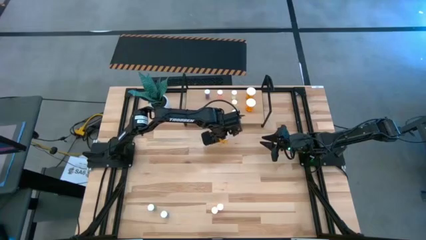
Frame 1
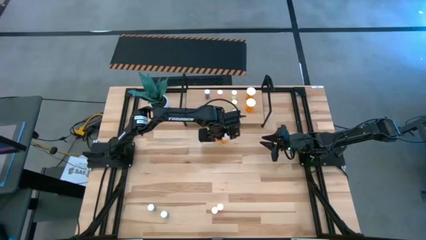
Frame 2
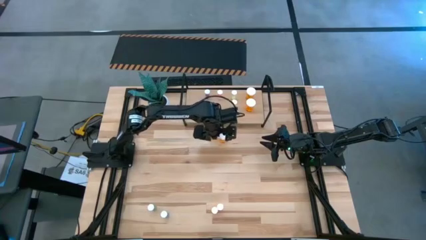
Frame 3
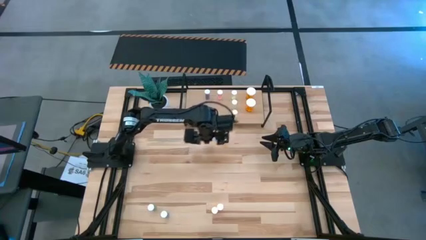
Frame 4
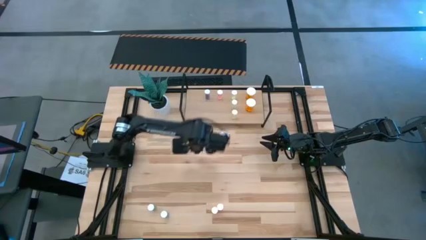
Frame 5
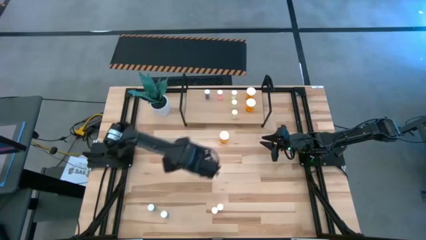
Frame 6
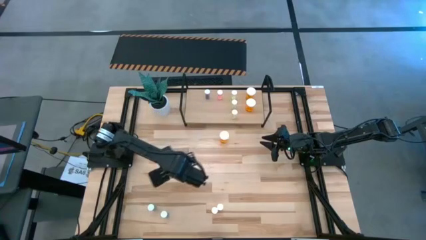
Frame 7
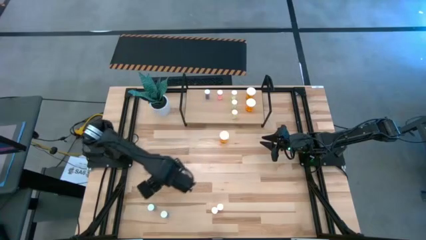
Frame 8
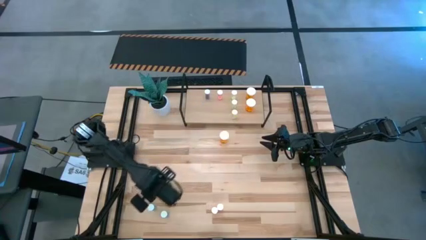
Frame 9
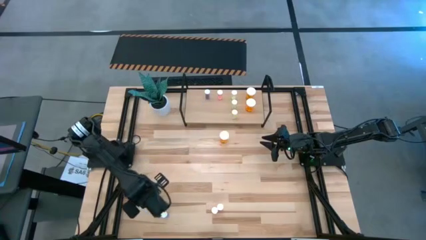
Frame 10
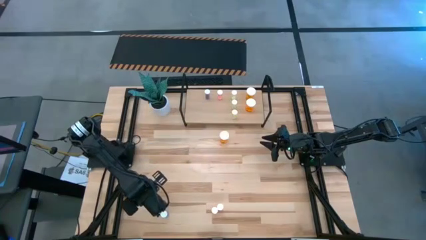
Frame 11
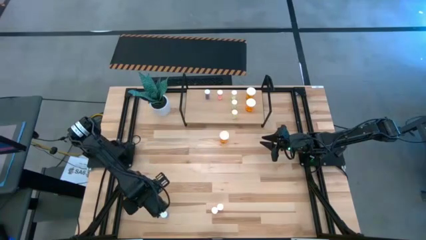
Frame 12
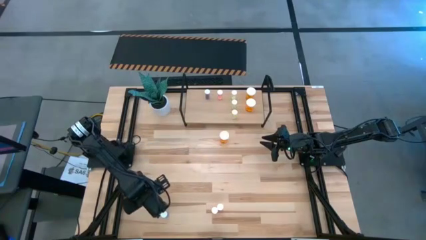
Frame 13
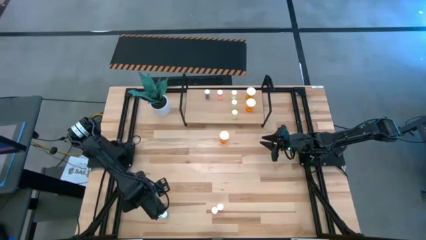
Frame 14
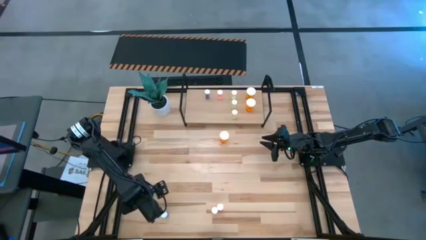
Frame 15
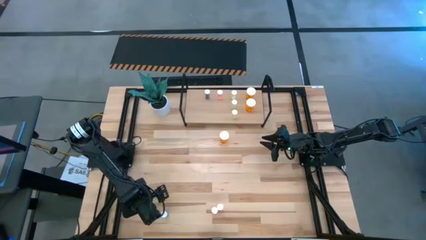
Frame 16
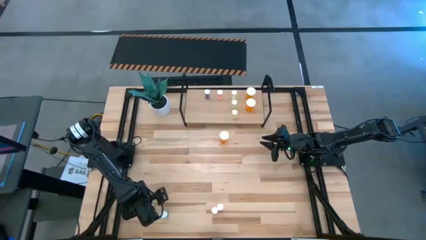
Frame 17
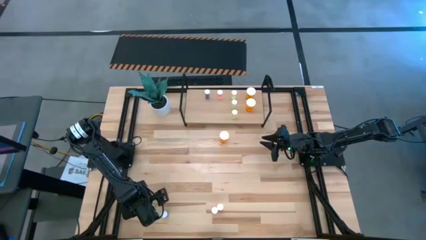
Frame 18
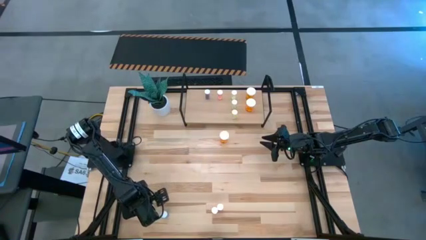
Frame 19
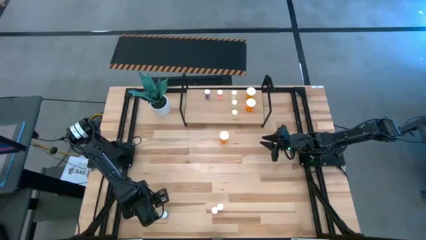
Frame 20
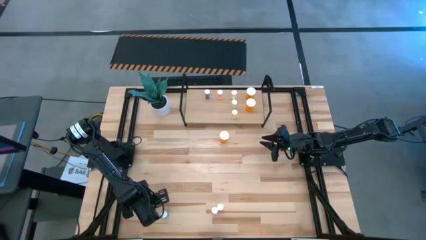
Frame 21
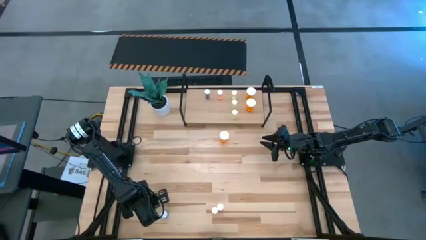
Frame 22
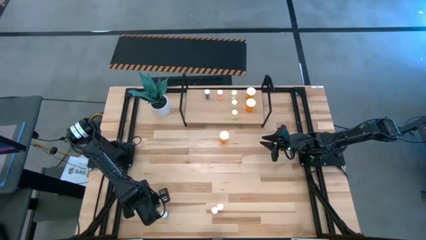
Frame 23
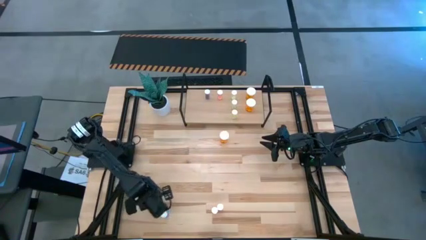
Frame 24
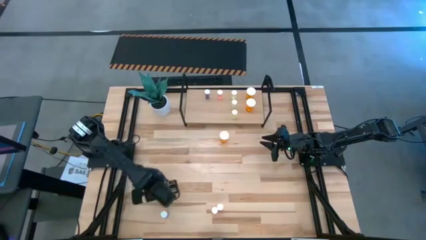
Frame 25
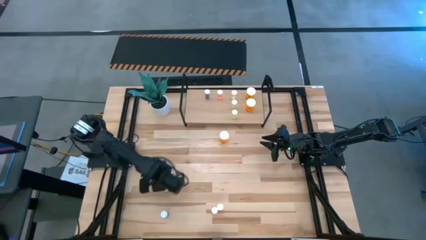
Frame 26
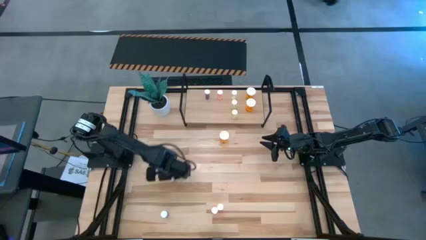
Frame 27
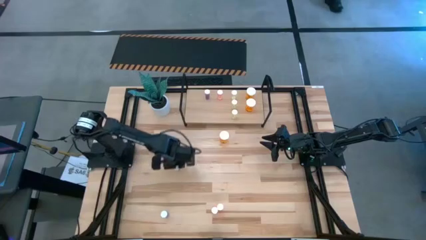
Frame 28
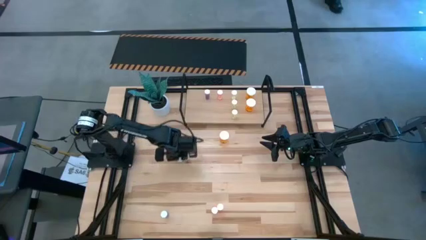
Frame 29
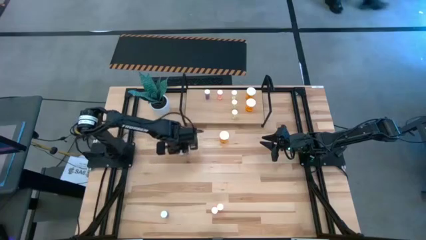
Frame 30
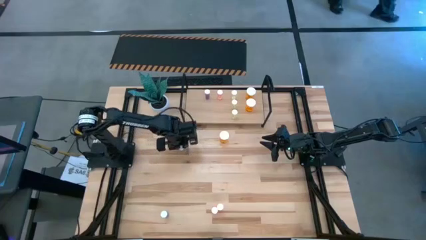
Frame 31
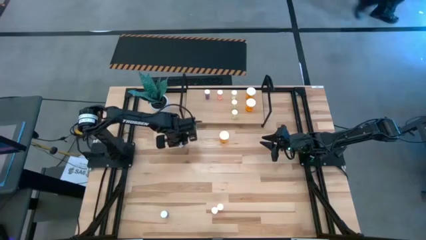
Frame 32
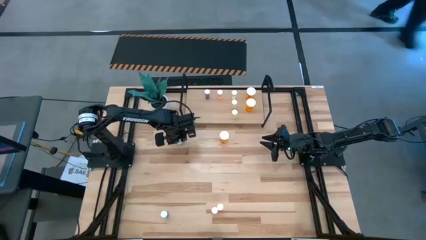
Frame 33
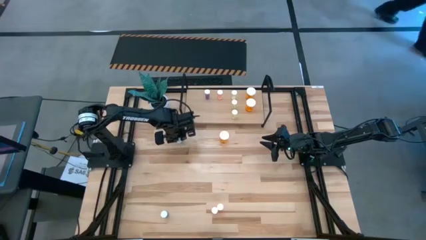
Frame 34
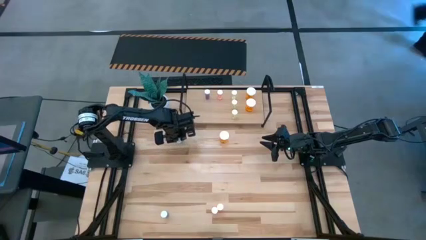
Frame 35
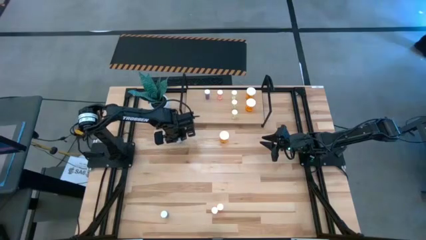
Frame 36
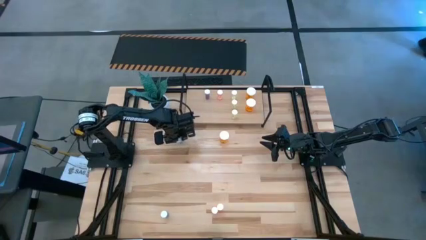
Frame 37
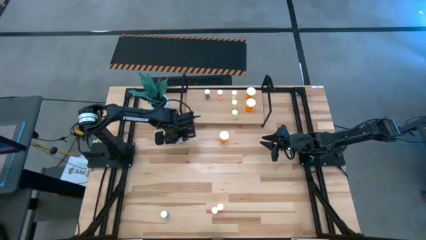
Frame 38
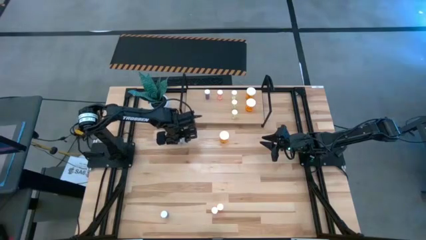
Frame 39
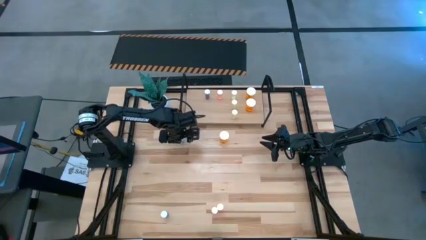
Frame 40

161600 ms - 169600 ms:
Task: Pick and place medicine bottles onto shelf by color
Move the blue pill bottle to the top left of the table

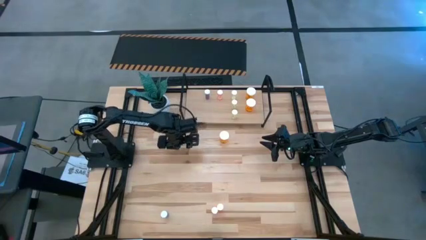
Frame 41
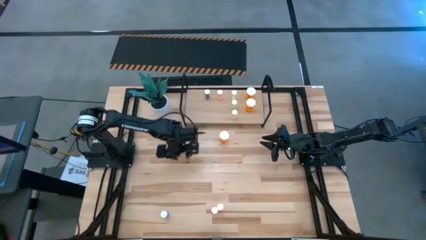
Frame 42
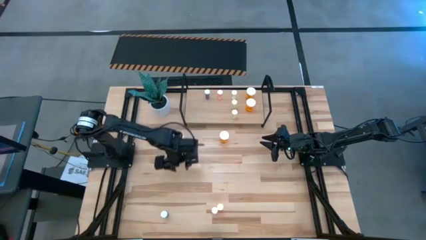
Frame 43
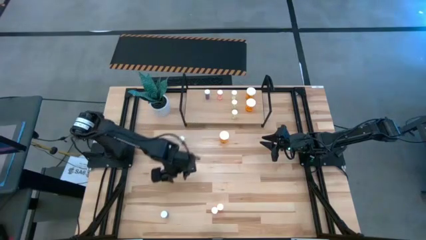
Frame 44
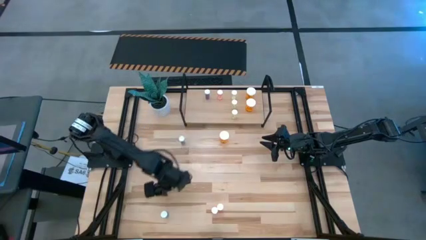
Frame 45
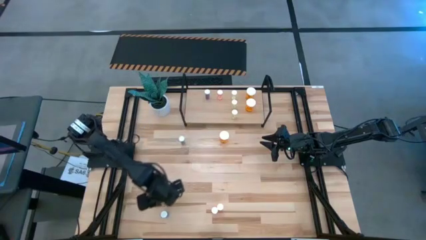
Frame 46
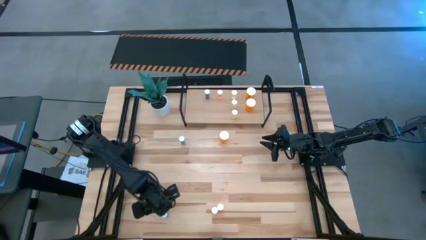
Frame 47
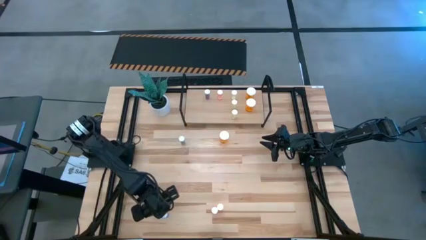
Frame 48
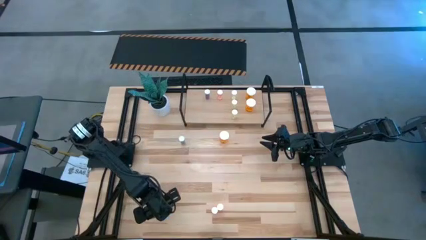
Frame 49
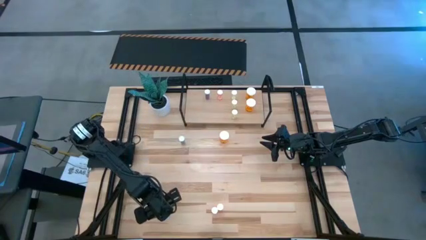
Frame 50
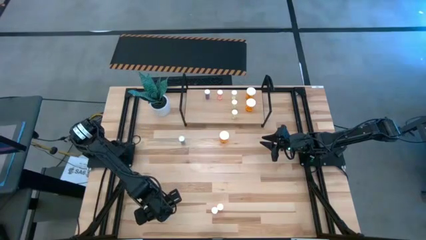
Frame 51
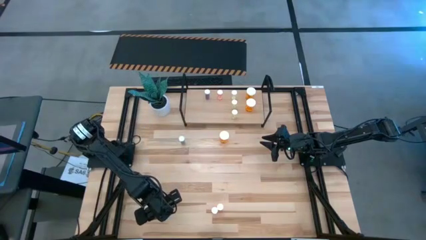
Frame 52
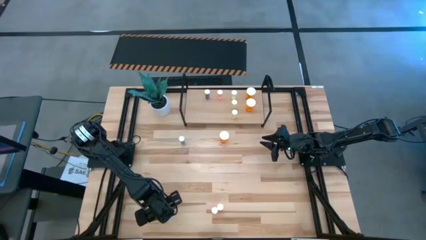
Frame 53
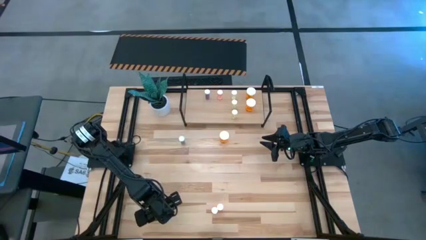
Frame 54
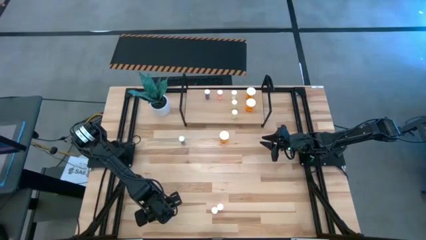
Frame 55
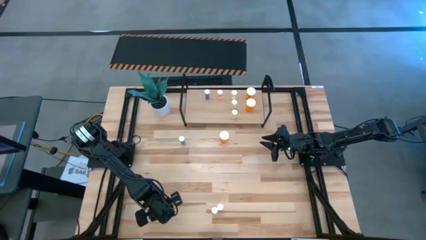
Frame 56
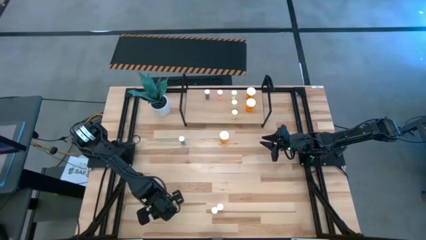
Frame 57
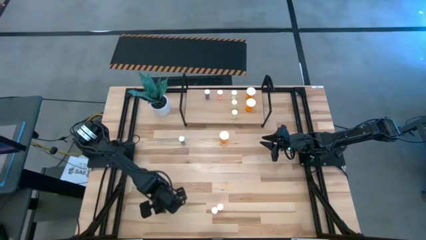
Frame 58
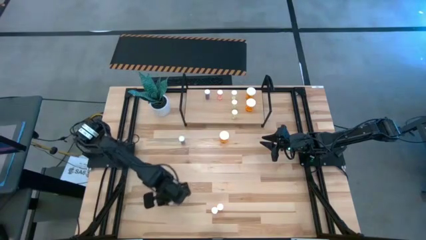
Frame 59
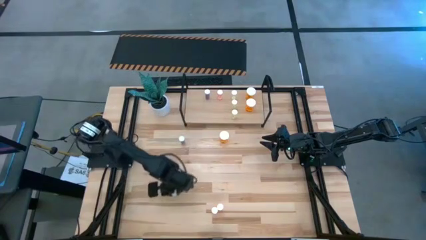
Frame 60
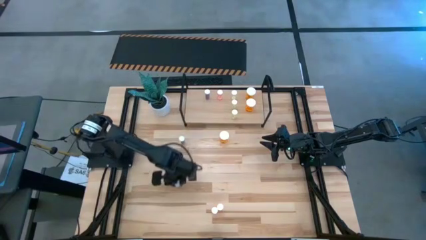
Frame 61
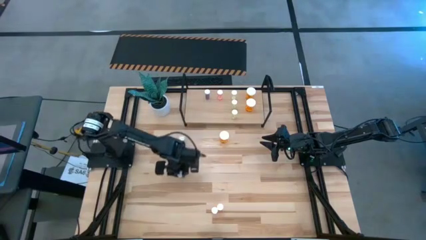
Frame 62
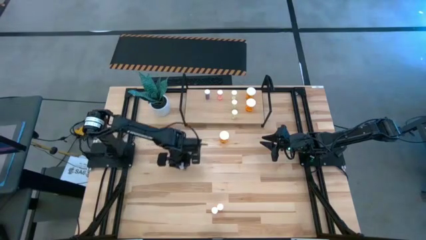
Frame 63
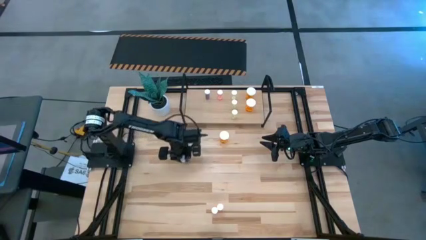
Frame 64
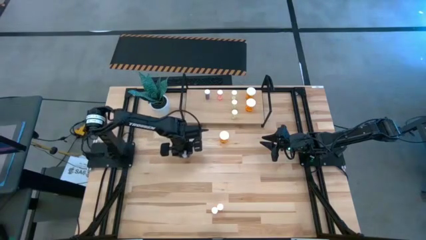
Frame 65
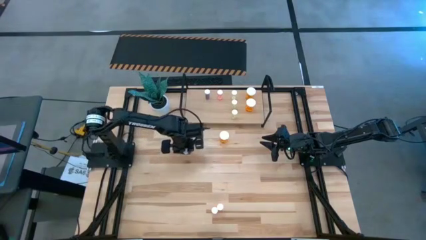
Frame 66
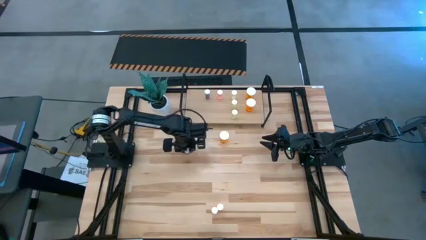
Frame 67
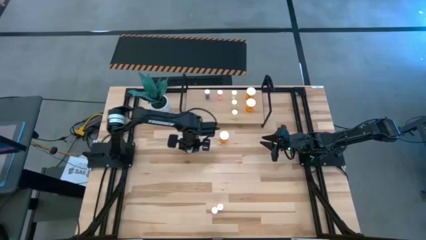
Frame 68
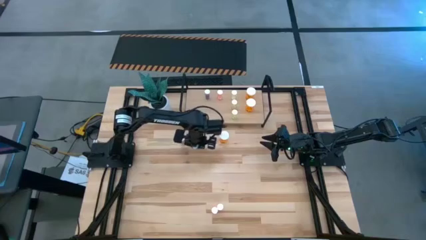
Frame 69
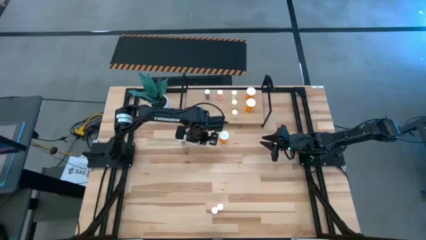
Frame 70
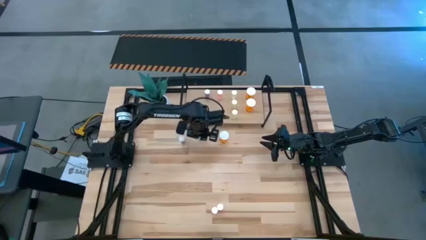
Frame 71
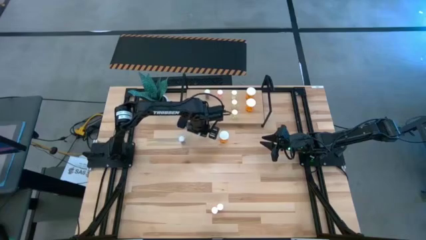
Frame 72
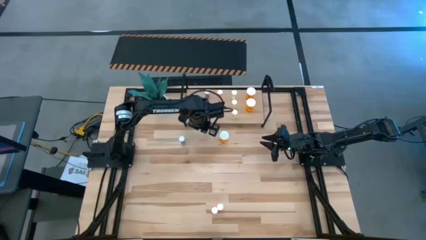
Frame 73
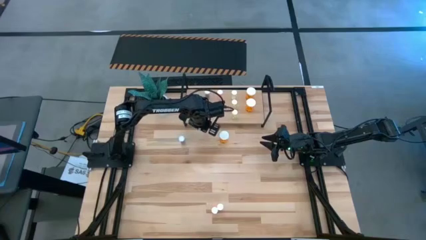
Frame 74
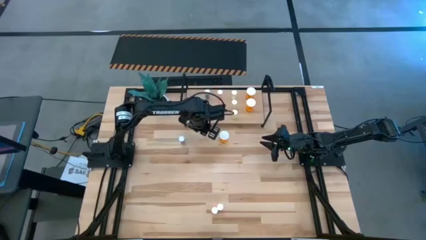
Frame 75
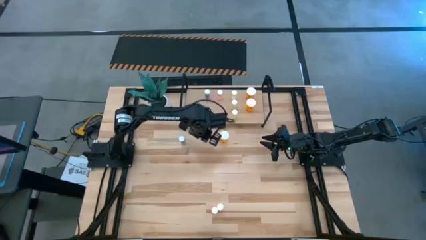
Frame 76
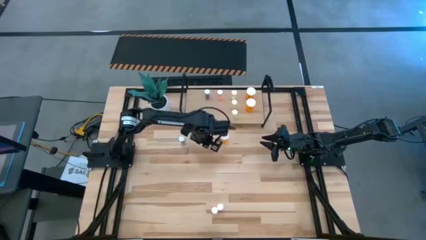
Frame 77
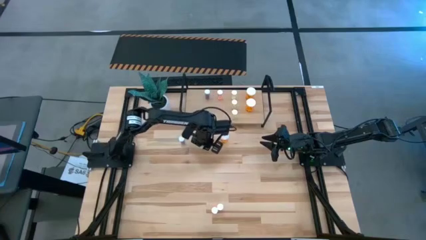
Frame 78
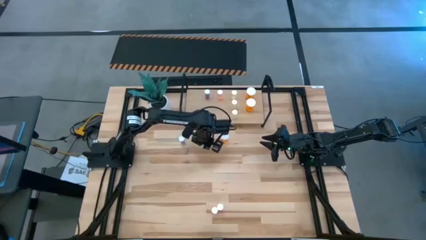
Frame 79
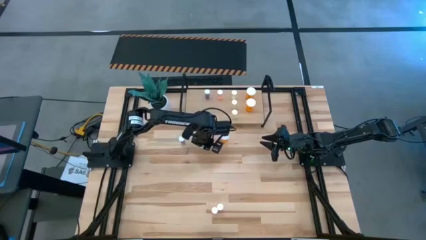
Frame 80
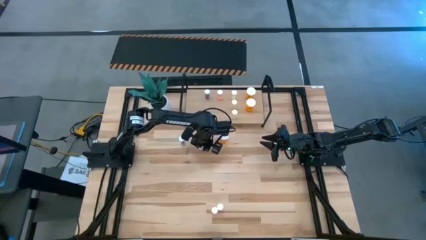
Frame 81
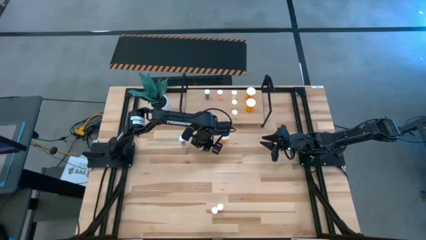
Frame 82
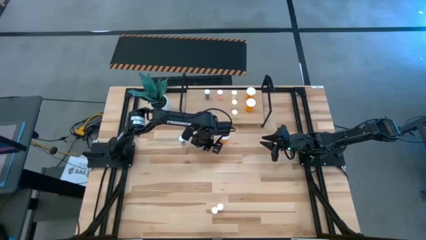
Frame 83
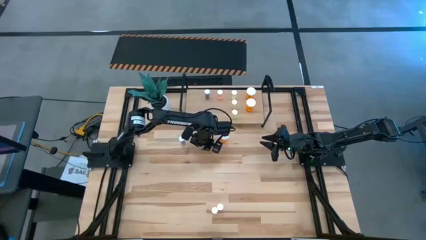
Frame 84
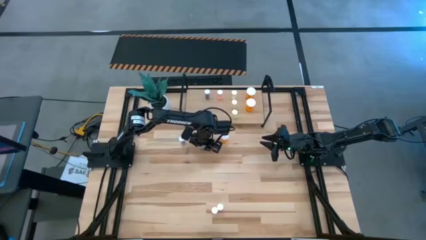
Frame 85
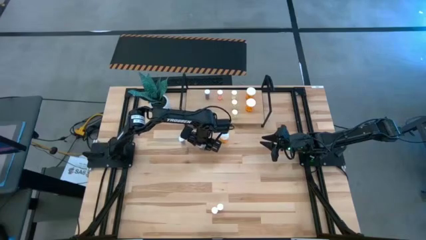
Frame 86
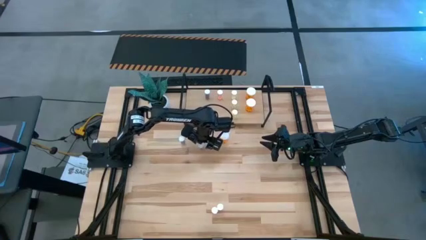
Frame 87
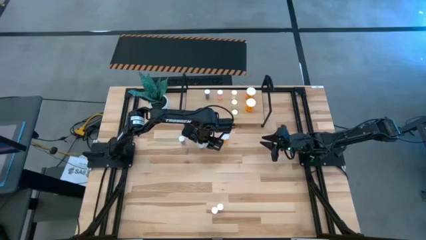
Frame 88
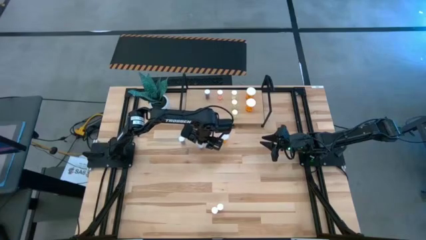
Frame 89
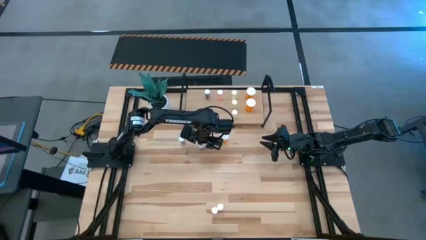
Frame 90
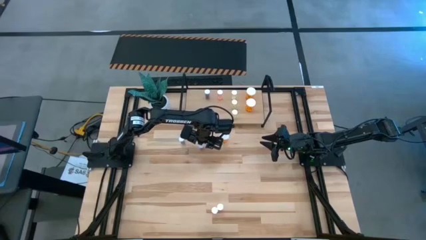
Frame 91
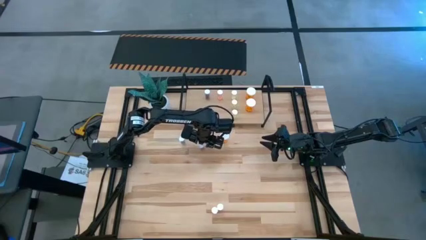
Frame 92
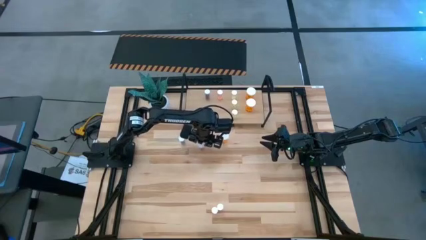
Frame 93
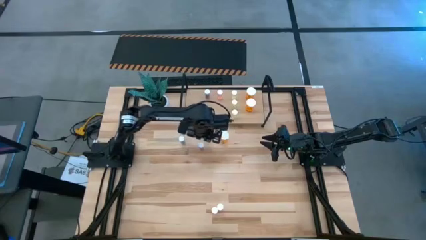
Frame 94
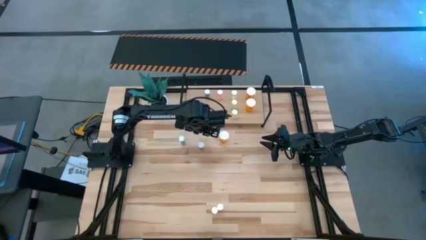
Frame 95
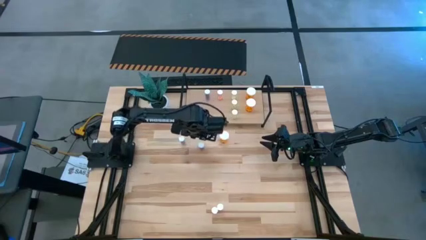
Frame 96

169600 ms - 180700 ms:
Put the blue pill bottle on the shelf
